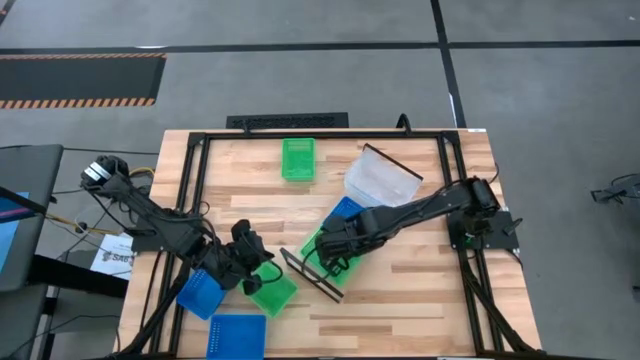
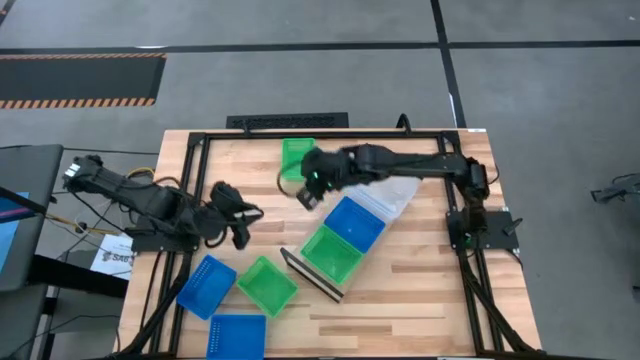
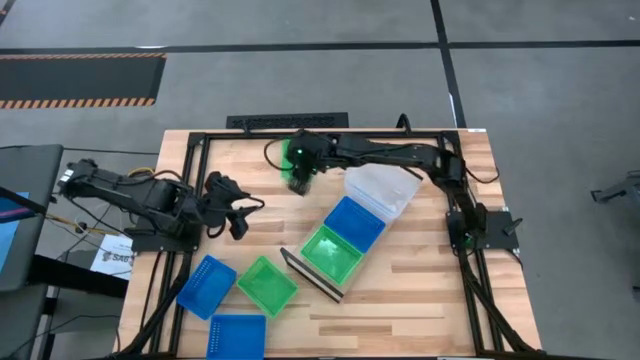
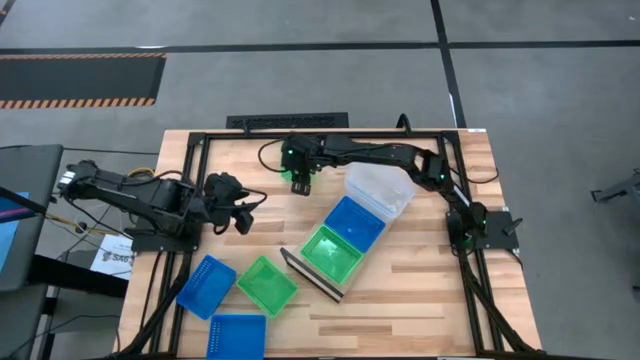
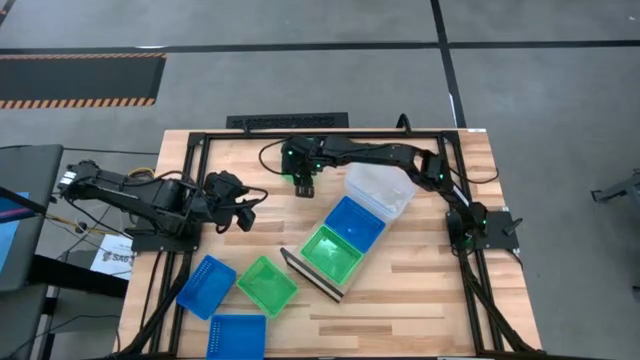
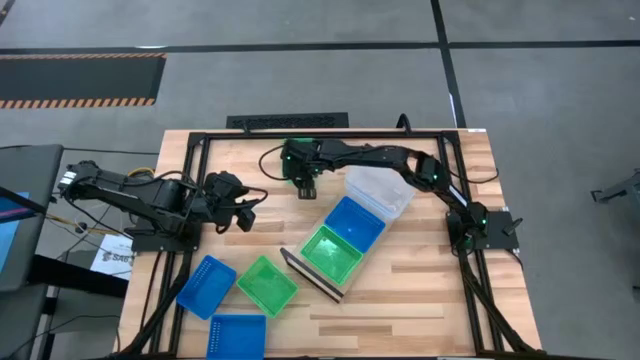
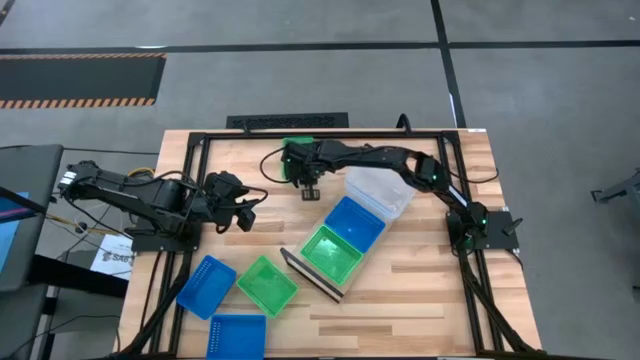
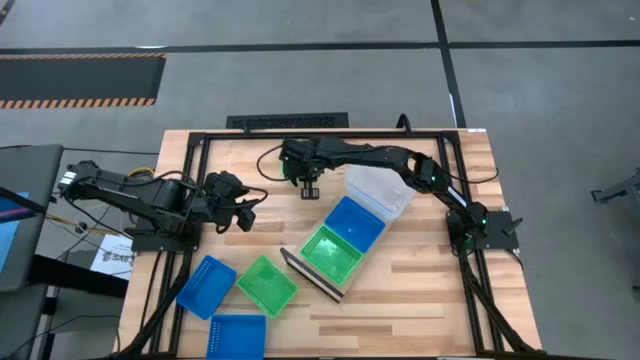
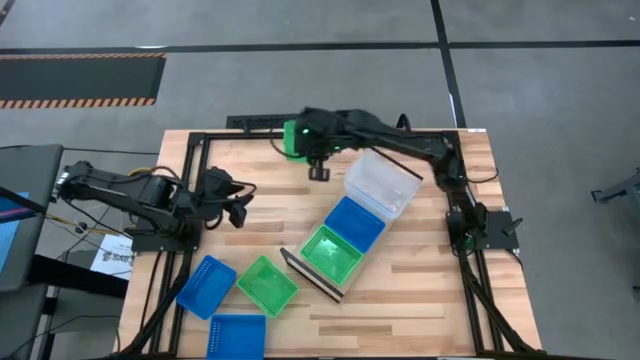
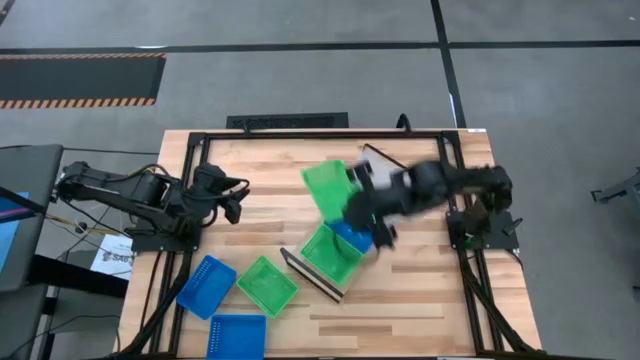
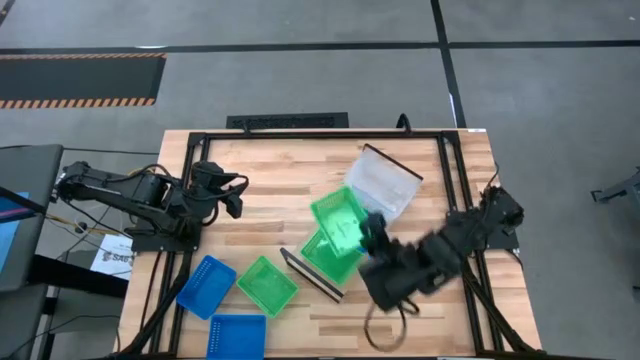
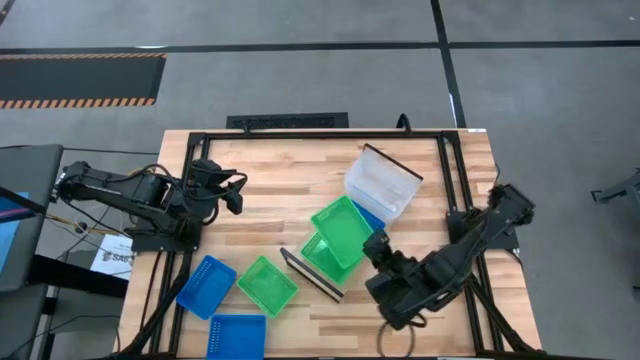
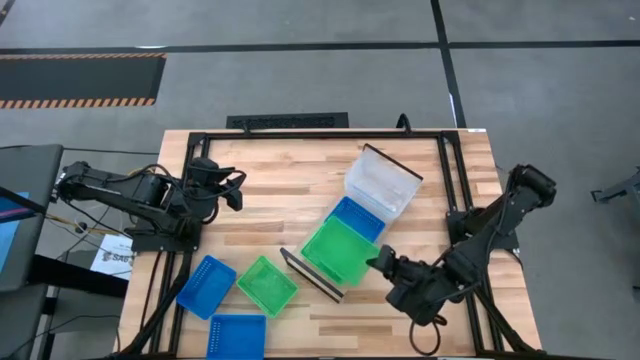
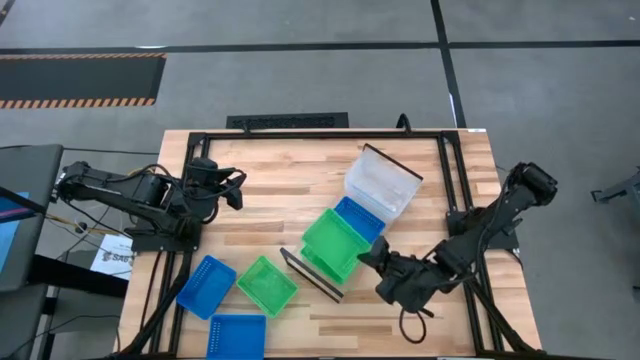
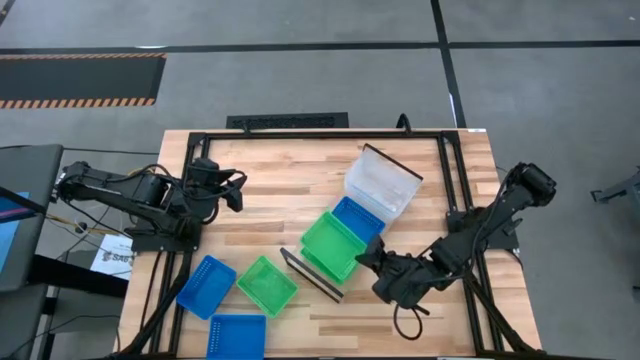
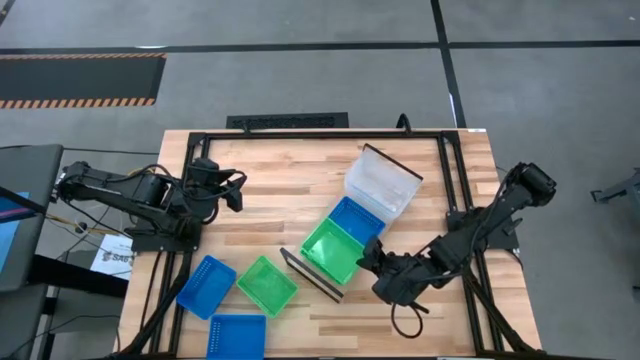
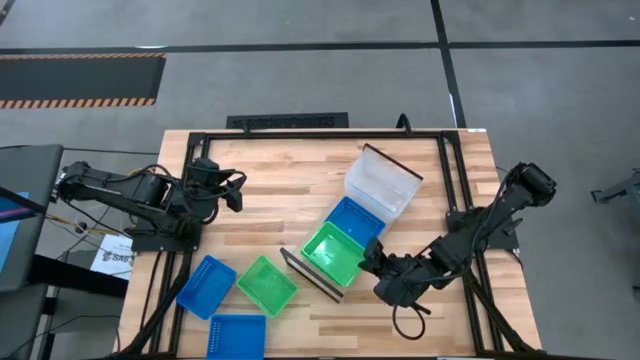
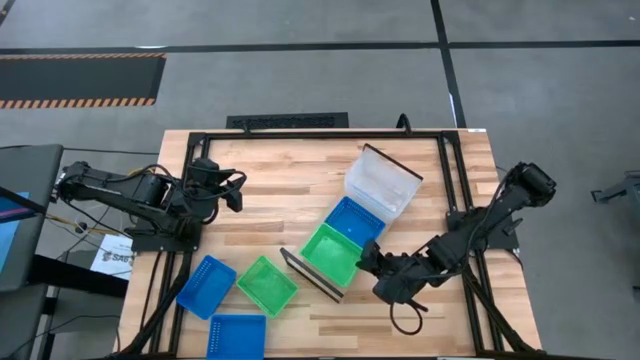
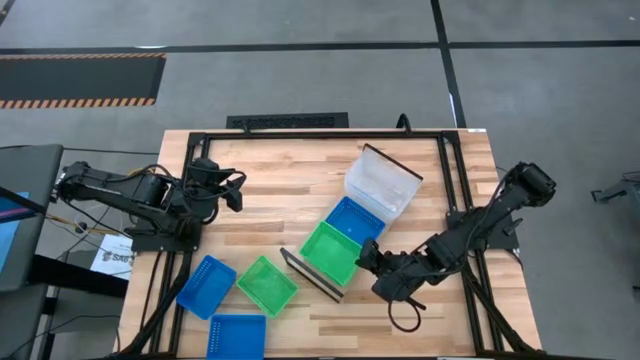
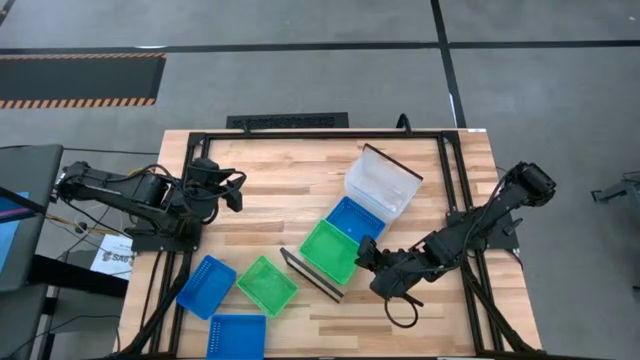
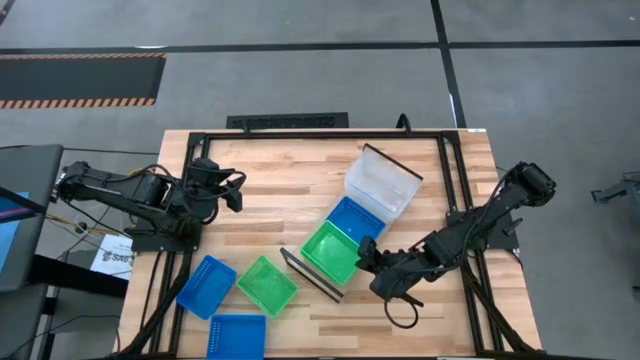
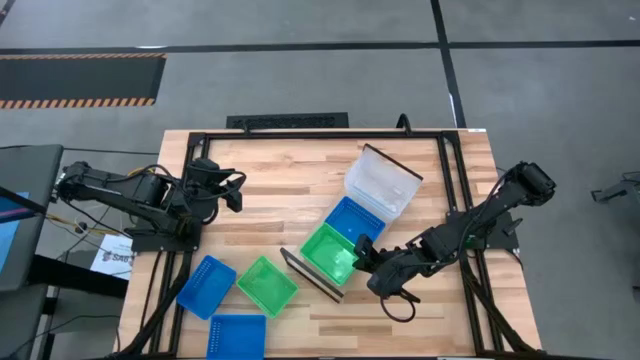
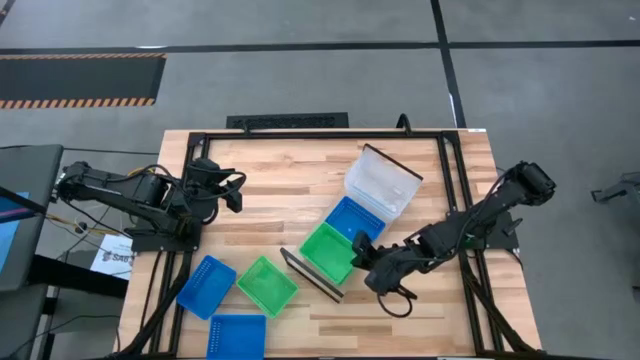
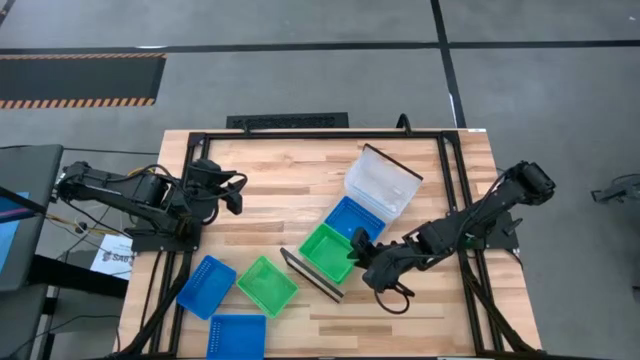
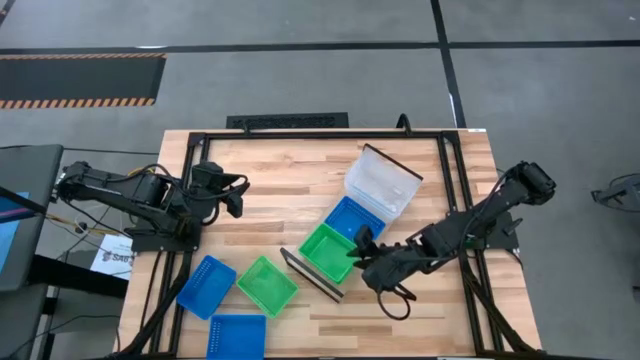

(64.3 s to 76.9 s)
Task: Stack baskets on shelf by color
Stack the top green bin on the other green bin on the shelf

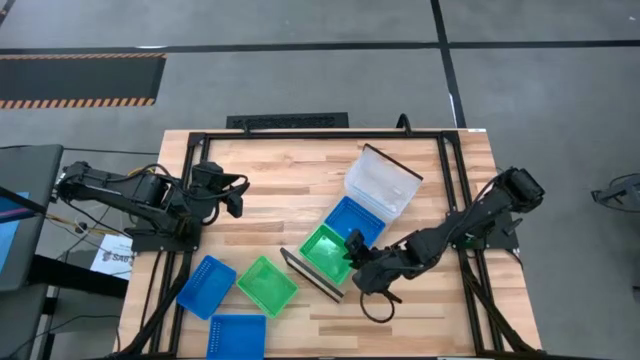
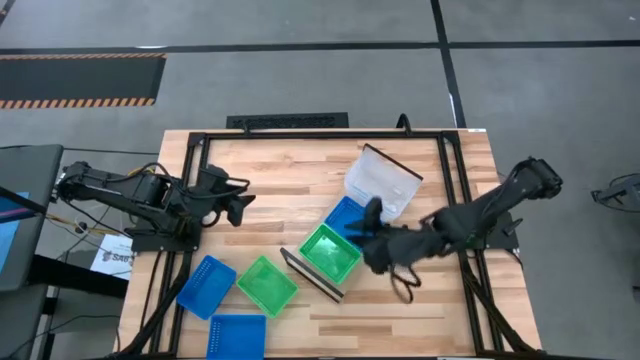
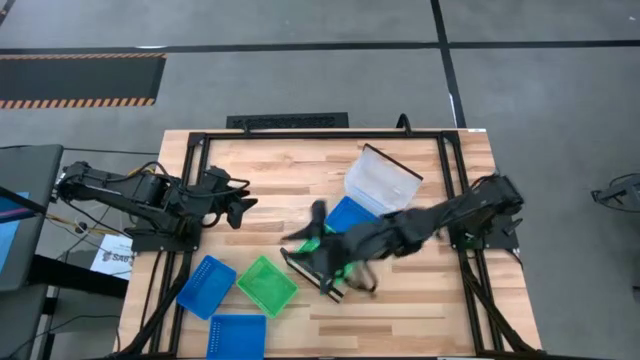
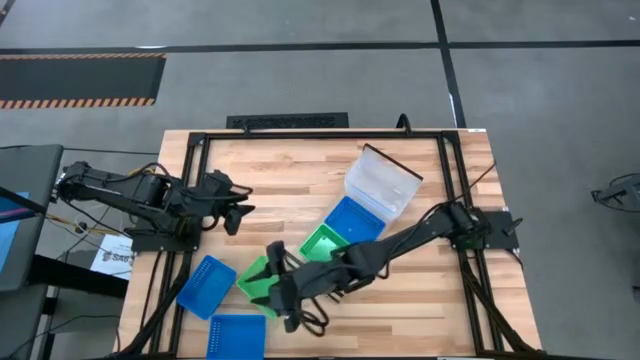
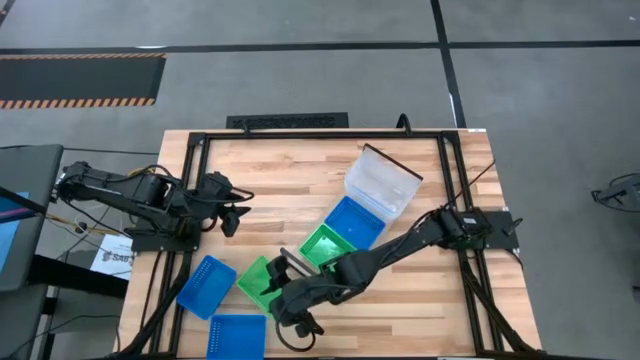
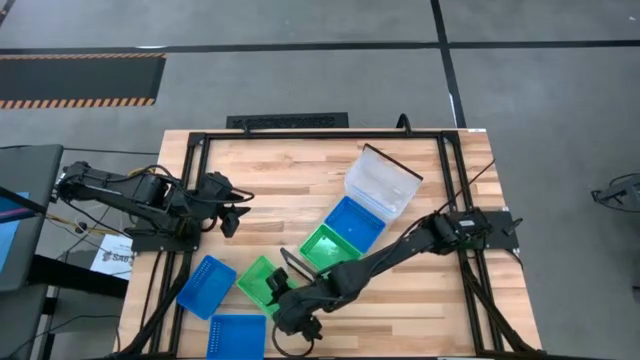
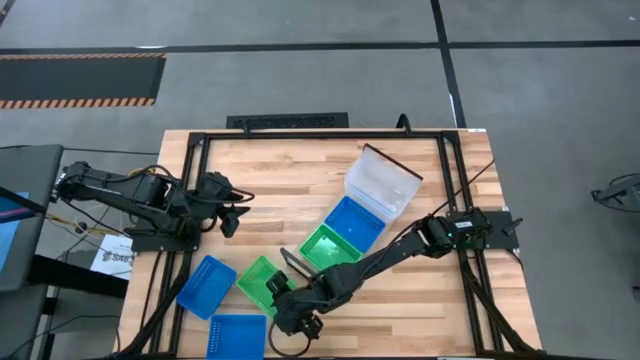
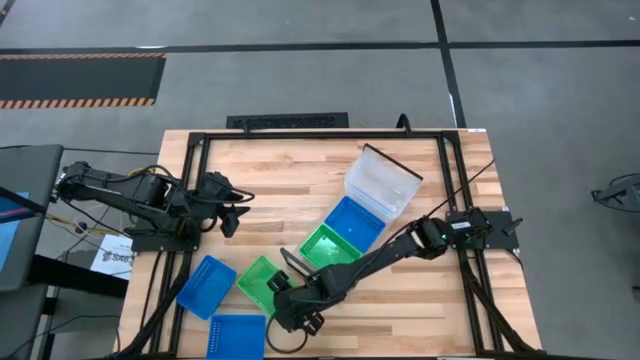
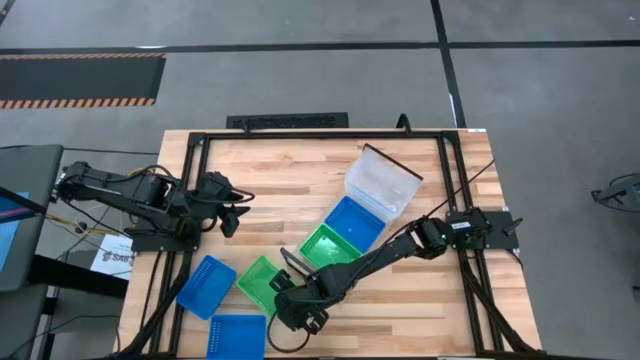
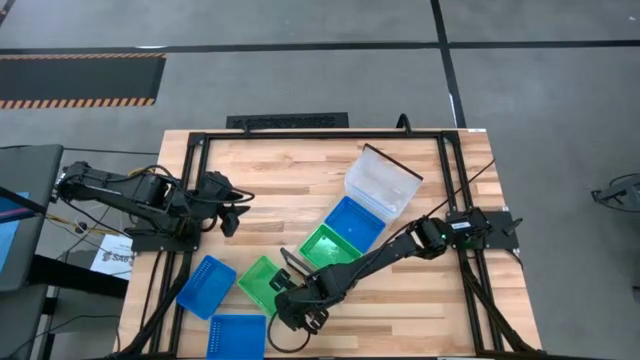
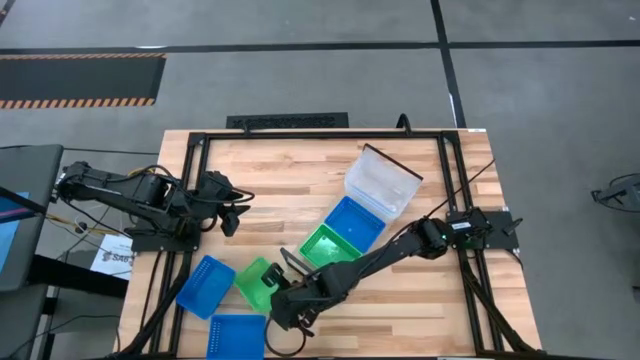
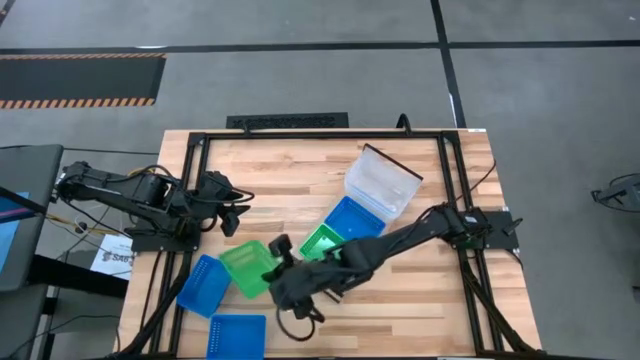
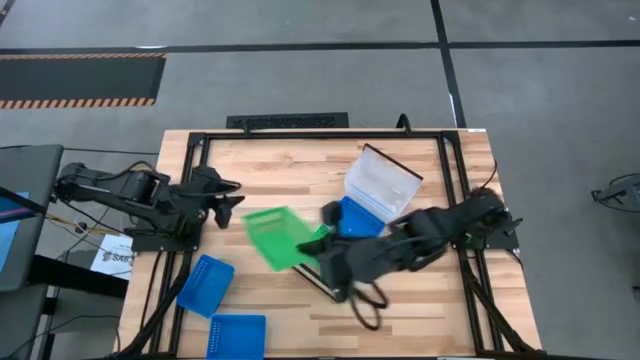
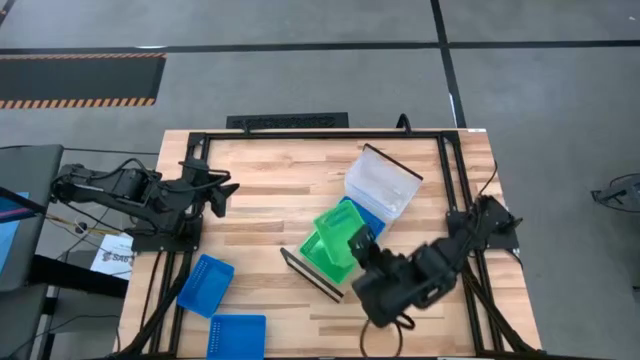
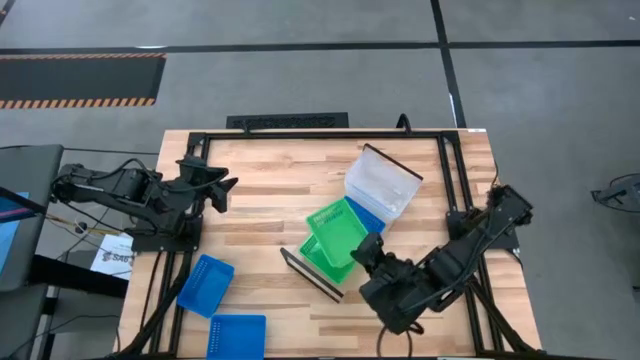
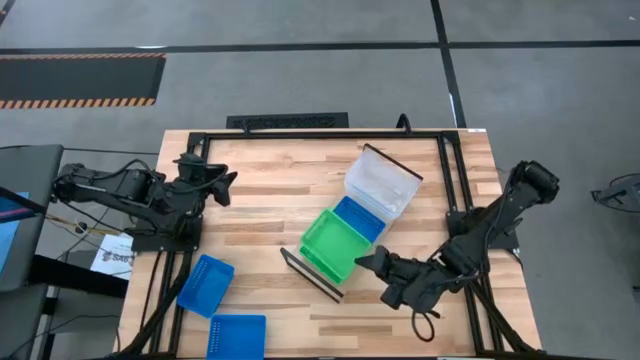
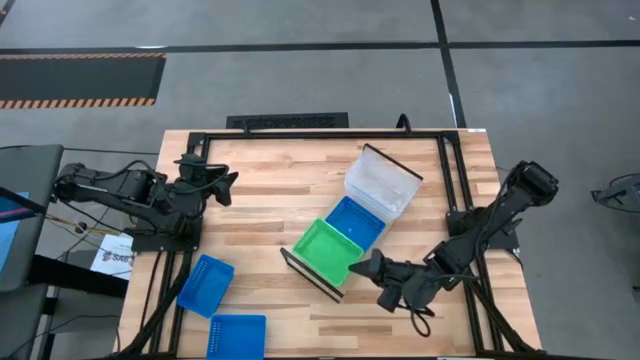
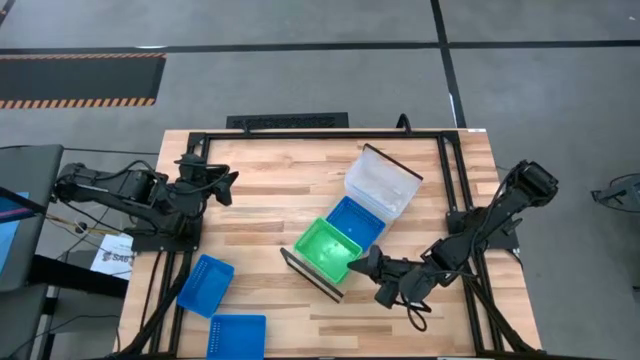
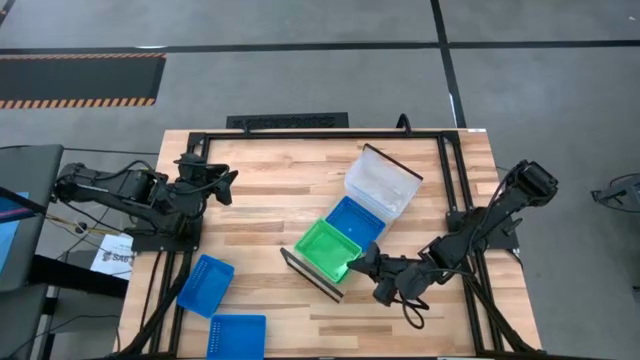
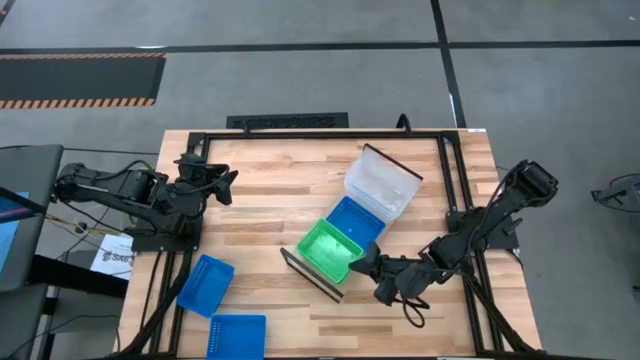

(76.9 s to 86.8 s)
Stack the green bin on the other green bins on the shelf
